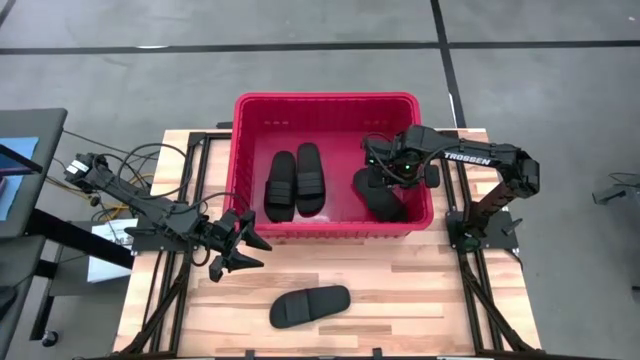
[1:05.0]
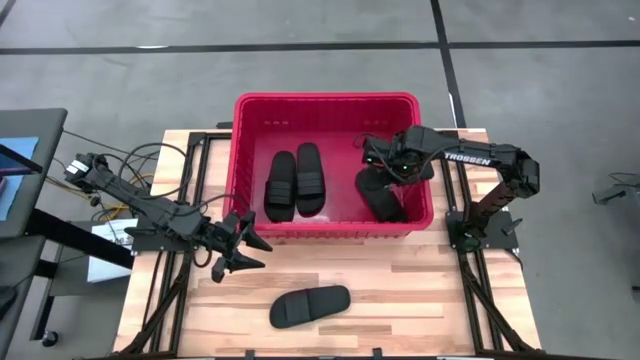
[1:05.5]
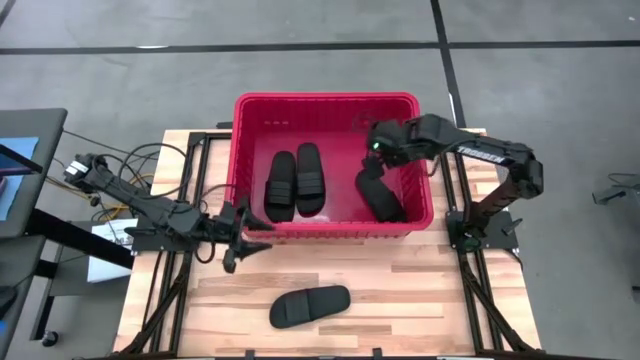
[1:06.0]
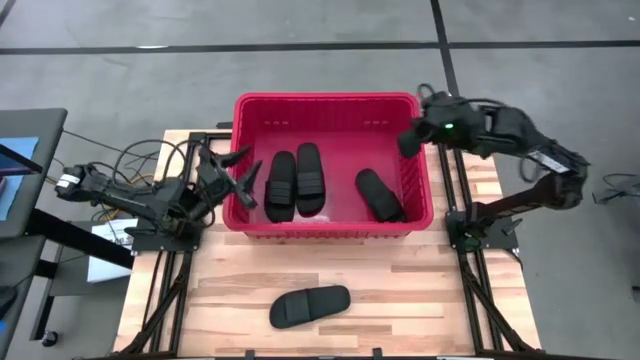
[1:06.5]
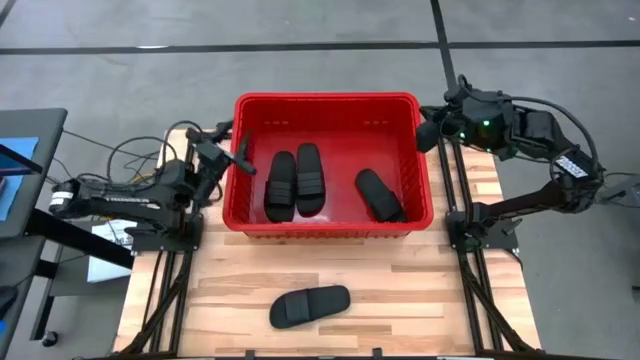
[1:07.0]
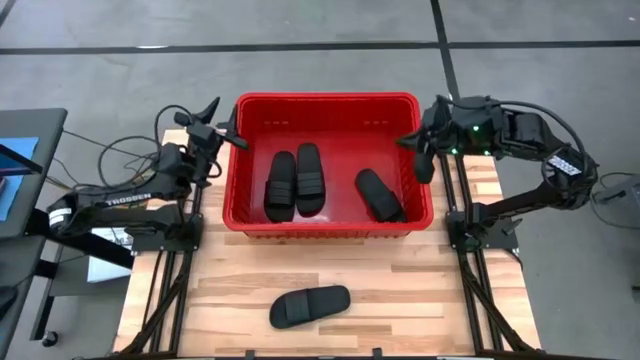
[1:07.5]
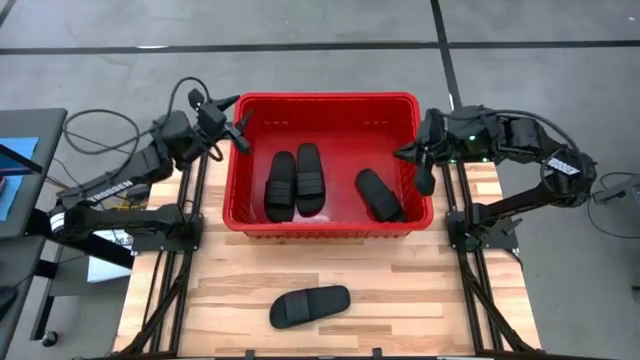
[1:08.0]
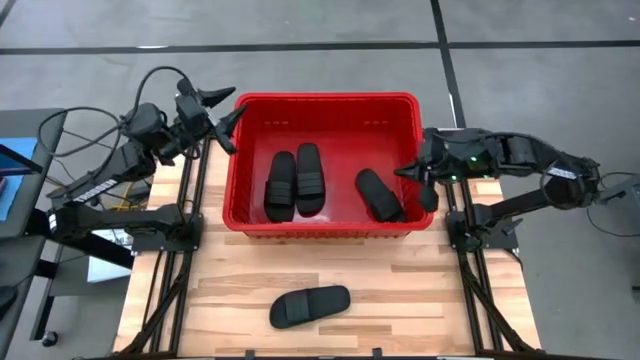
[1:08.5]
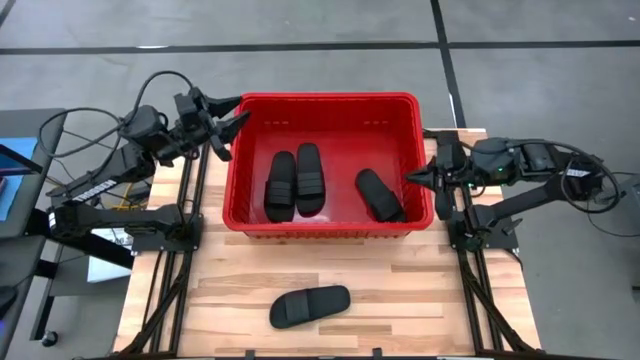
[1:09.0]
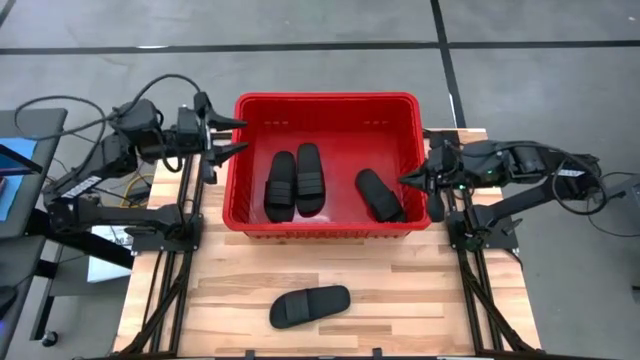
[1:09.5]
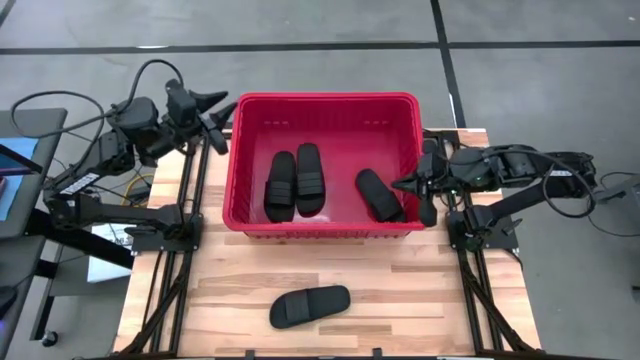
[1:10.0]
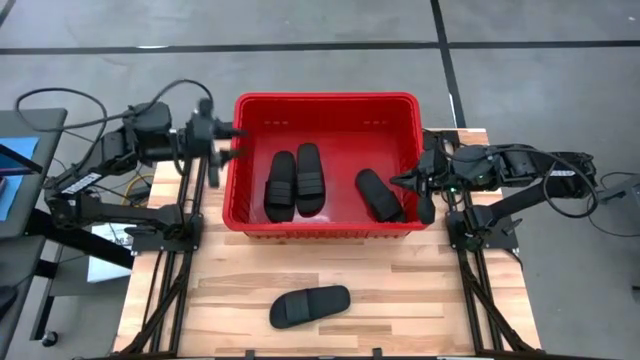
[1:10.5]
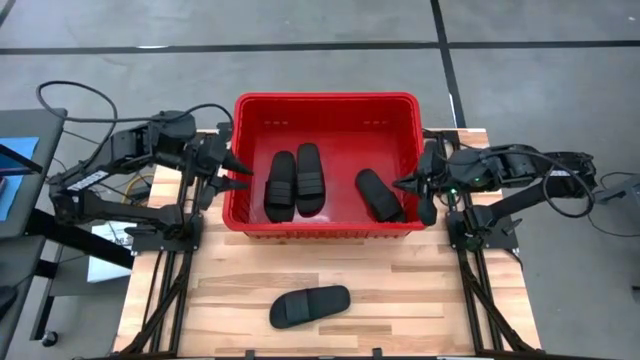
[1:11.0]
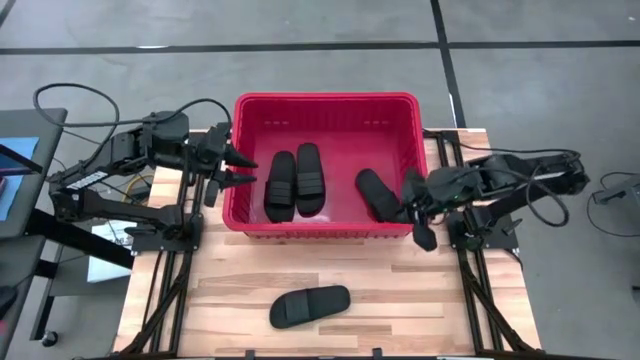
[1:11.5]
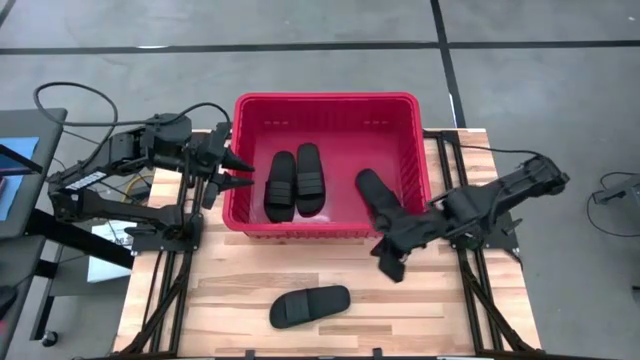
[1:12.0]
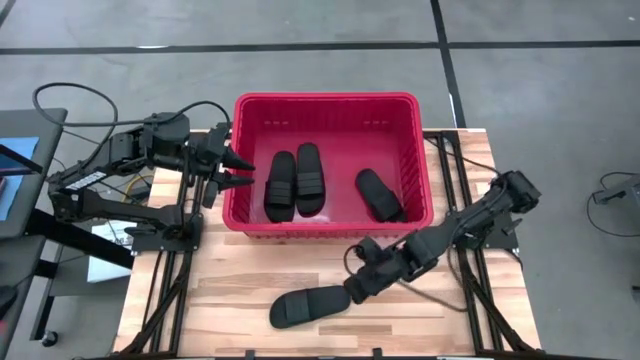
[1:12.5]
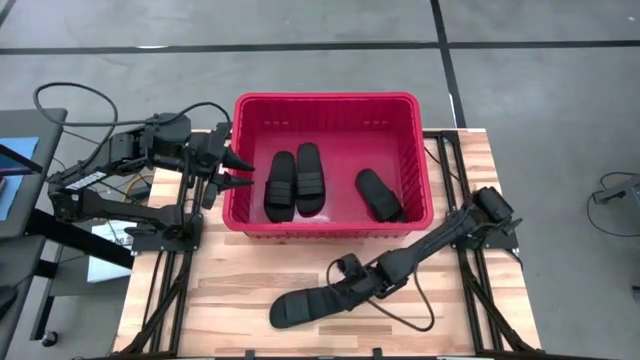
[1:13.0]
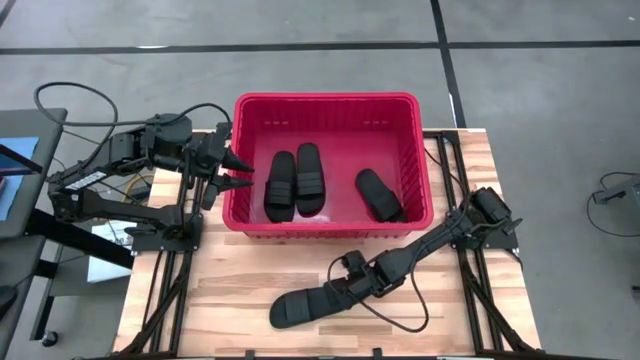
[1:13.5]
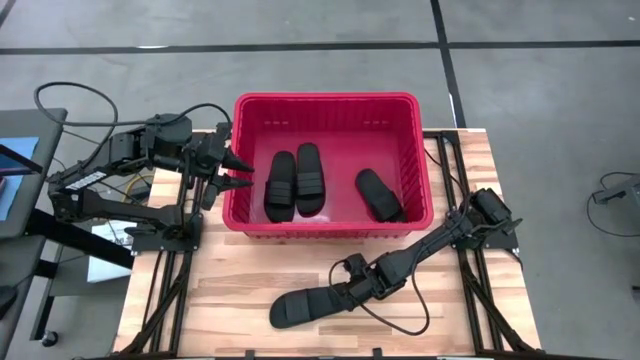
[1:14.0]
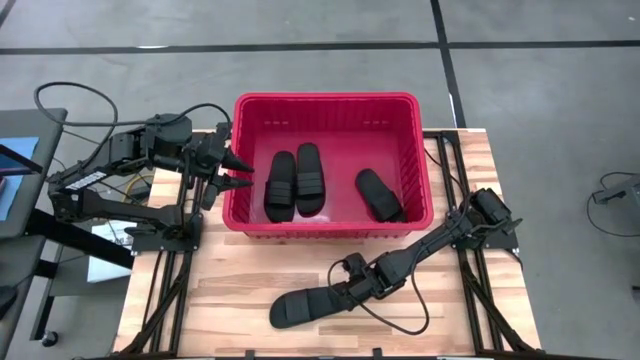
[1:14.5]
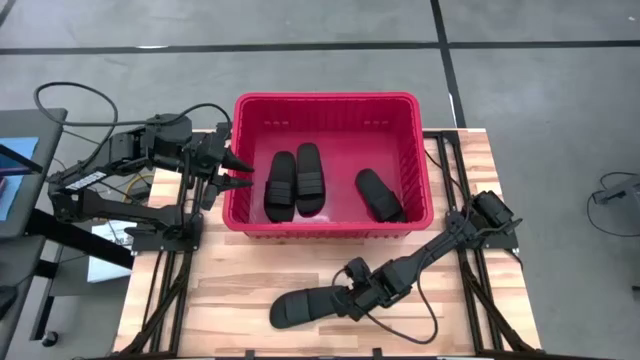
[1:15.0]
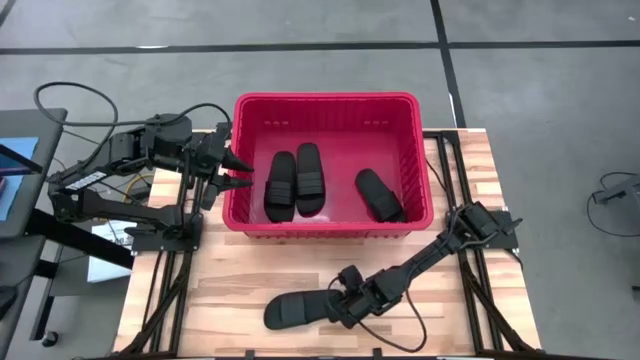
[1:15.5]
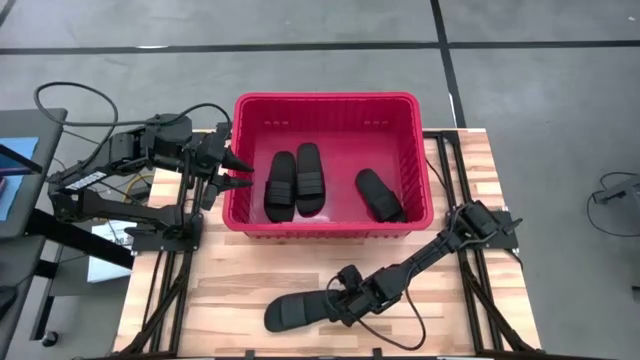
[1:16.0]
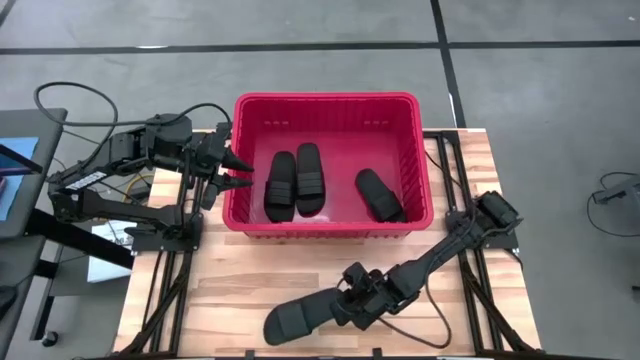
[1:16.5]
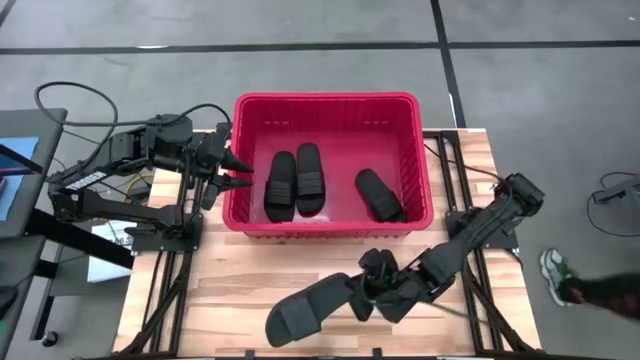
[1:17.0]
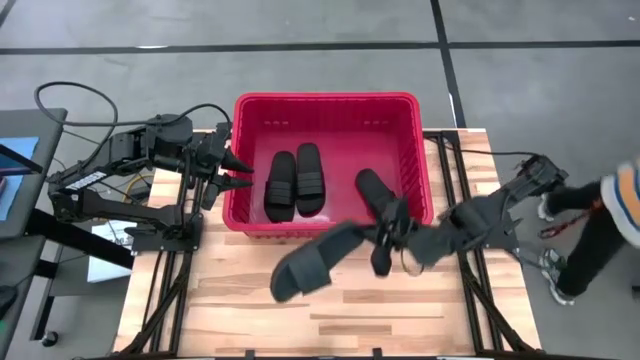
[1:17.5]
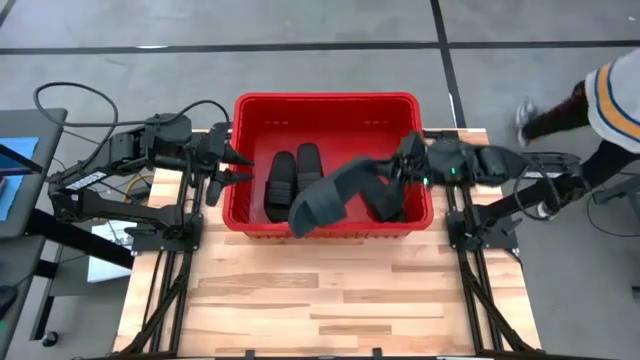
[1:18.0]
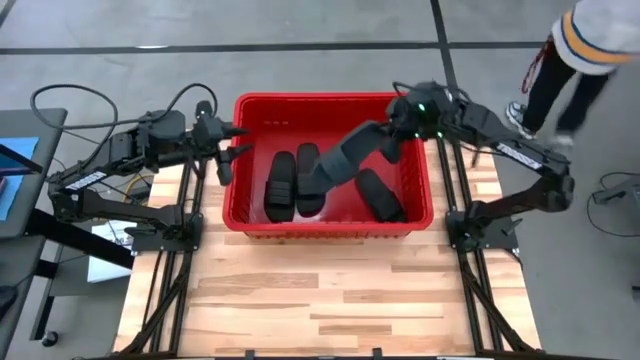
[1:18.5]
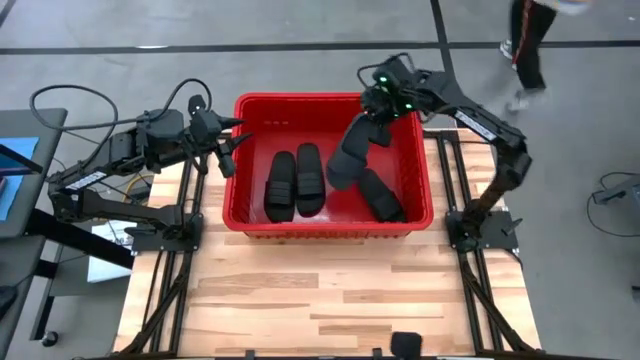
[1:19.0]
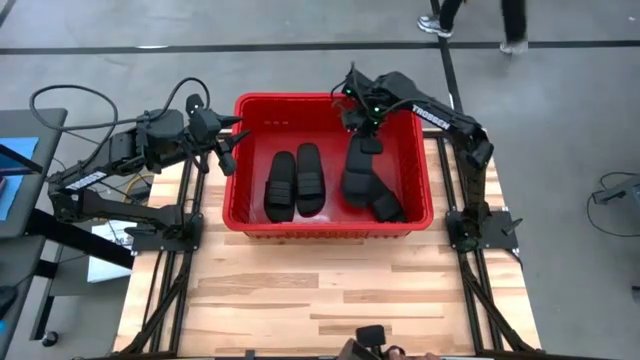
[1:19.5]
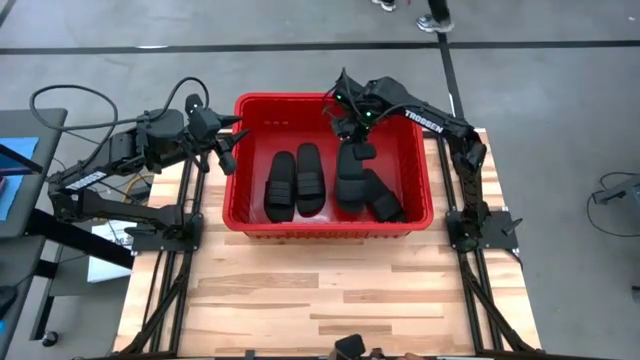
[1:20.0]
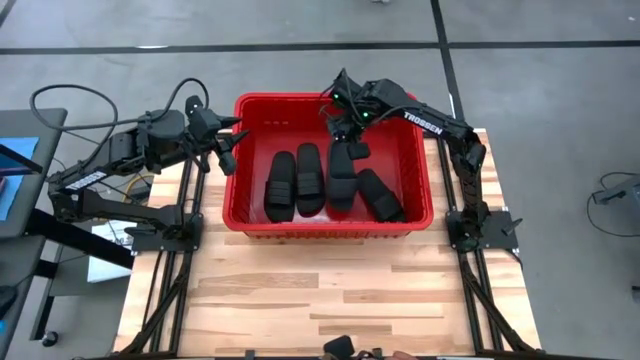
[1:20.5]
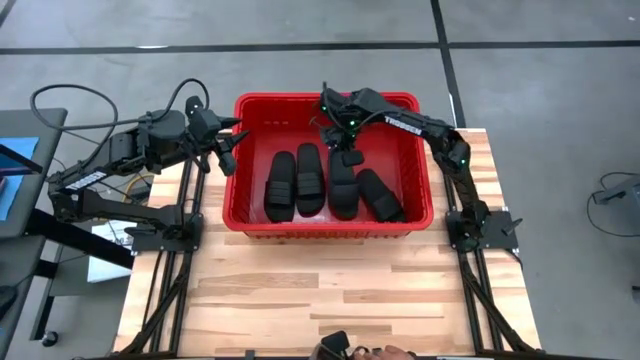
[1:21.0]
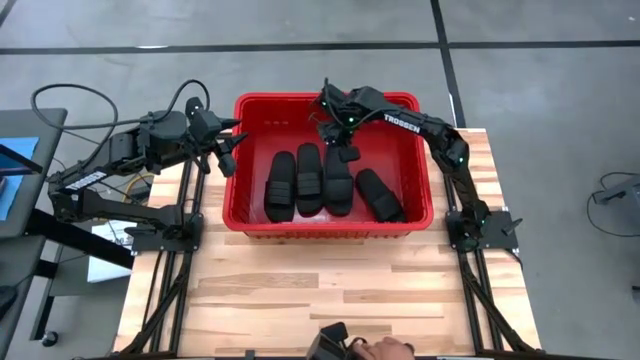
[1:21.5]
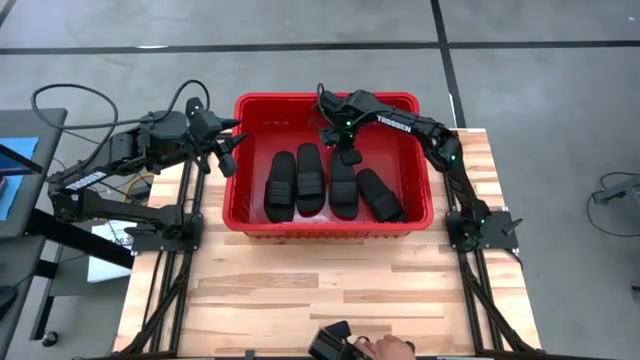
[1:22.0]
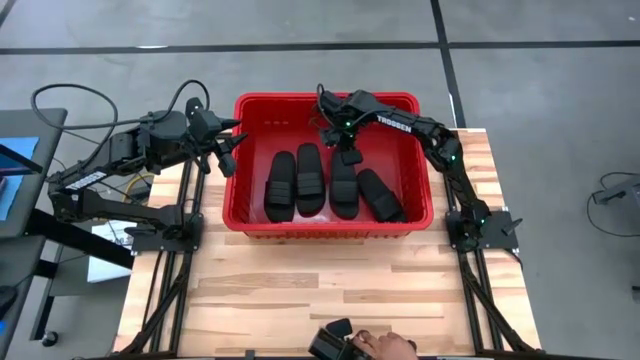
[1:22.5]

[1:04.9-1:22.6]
Task: Pick and place slides into bin
Put the slide into the organizer bin

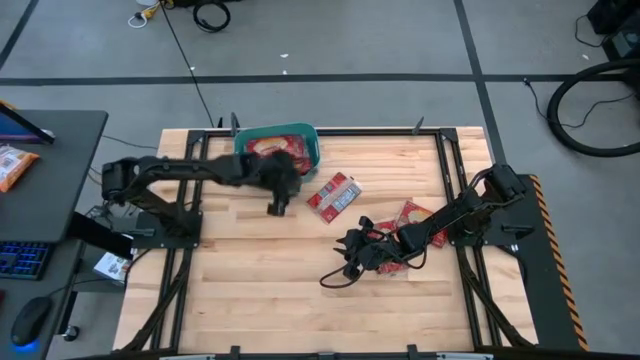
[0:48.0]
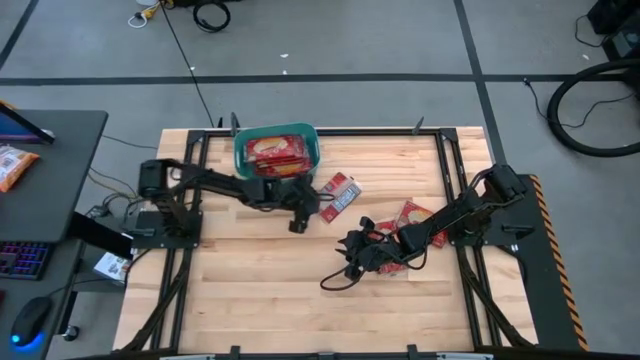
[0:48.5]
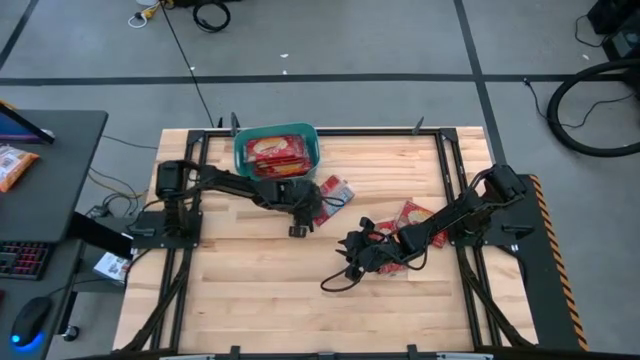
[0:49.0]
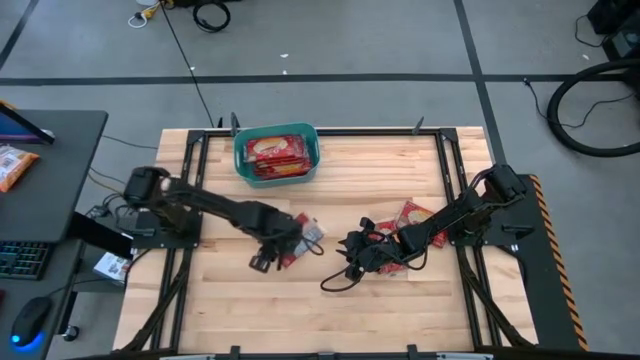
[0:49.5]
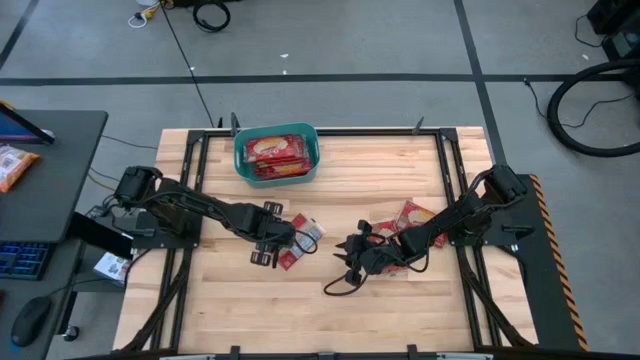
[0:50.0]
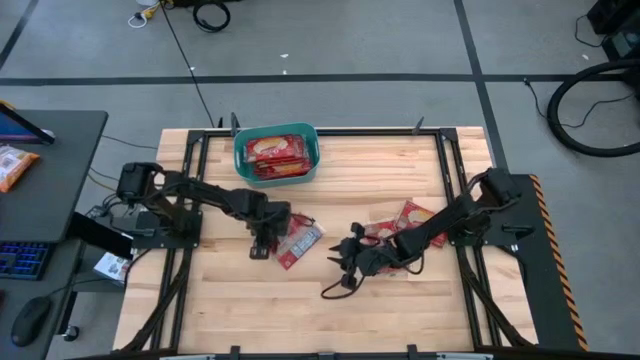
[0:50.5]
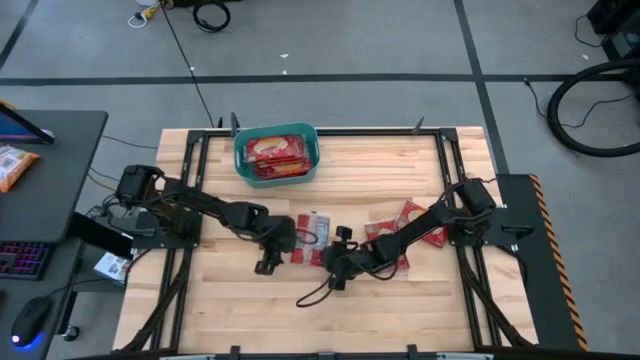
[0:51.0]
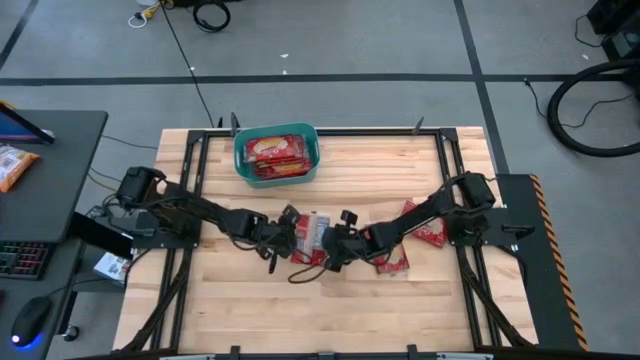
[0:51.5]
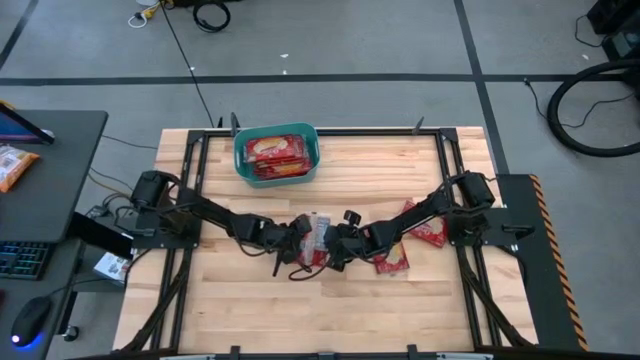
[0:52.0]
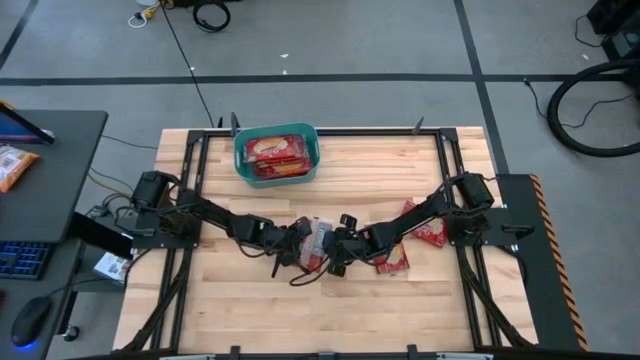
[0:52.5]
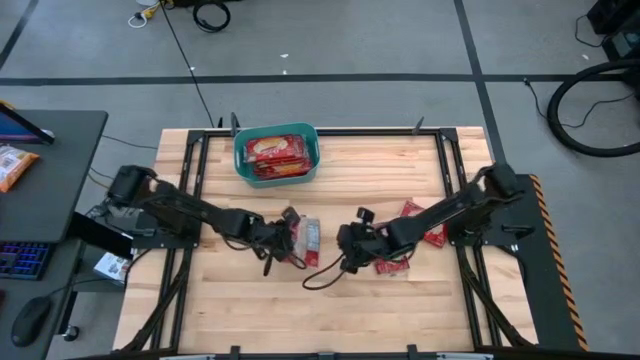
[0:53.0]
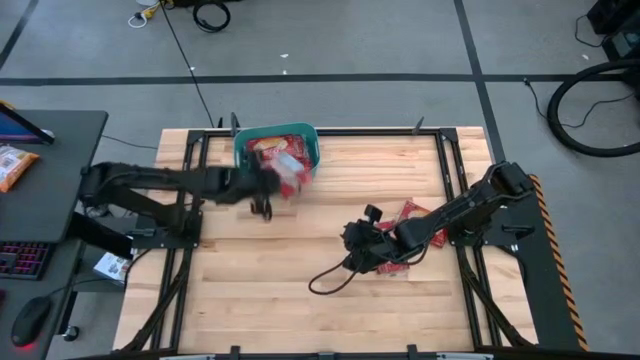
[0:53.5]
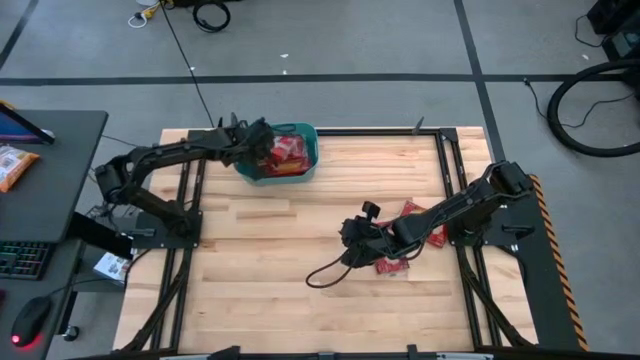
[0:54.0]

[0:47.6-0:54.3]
Task: Sort popcorn bags into baskets
Put the red popcorn bag into the green bin
